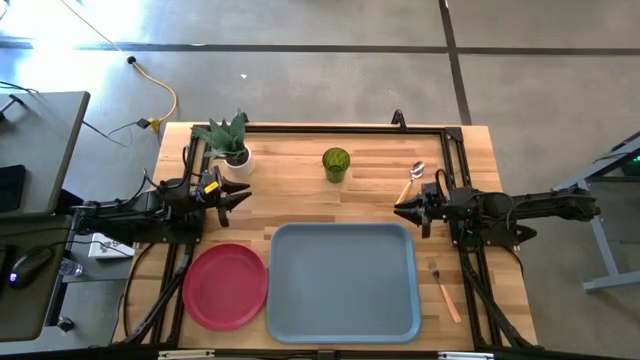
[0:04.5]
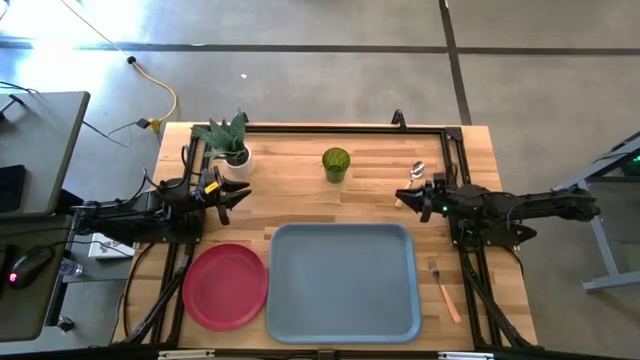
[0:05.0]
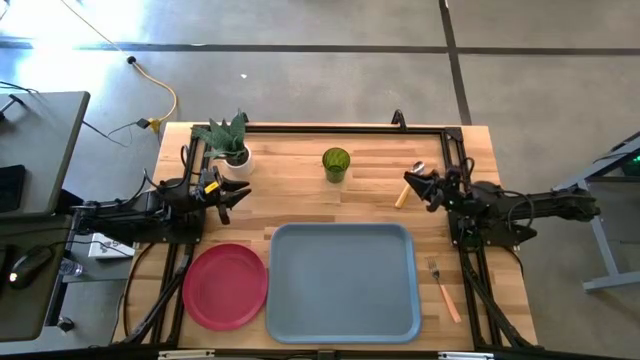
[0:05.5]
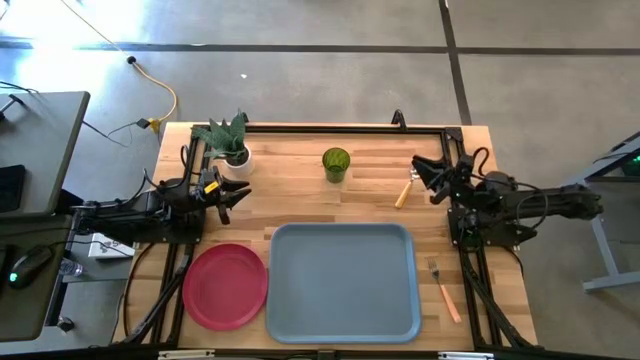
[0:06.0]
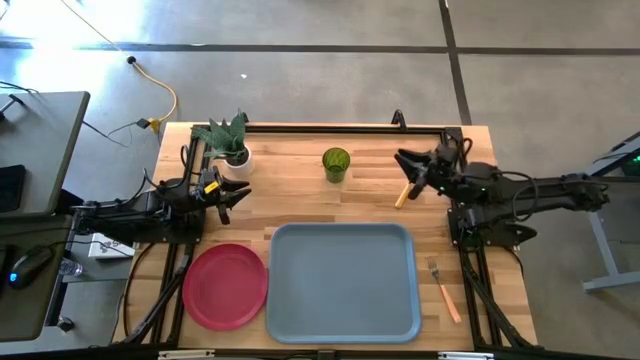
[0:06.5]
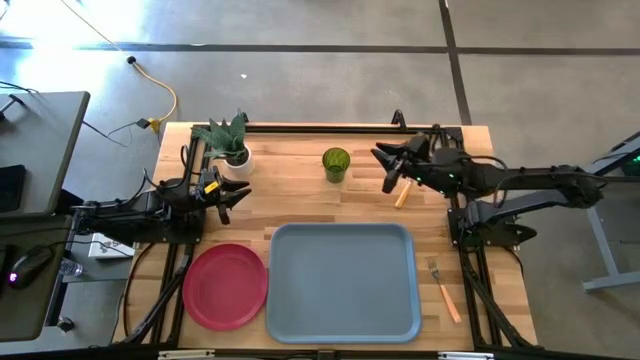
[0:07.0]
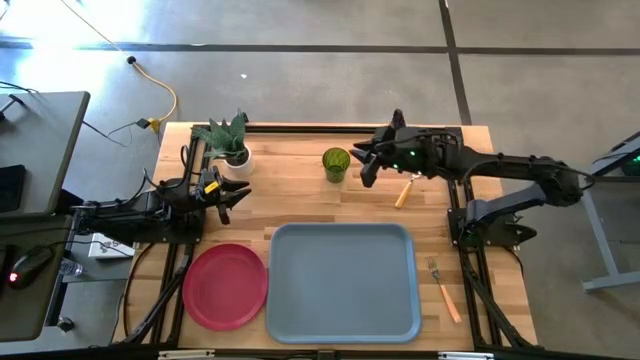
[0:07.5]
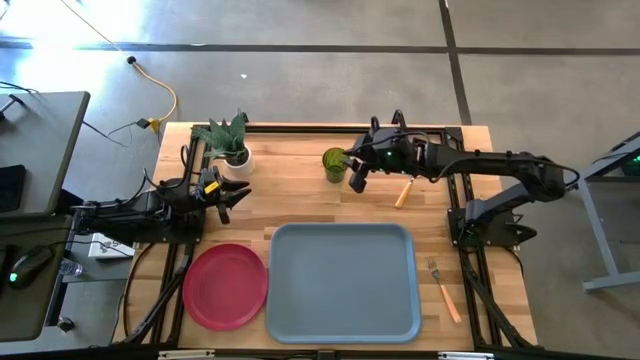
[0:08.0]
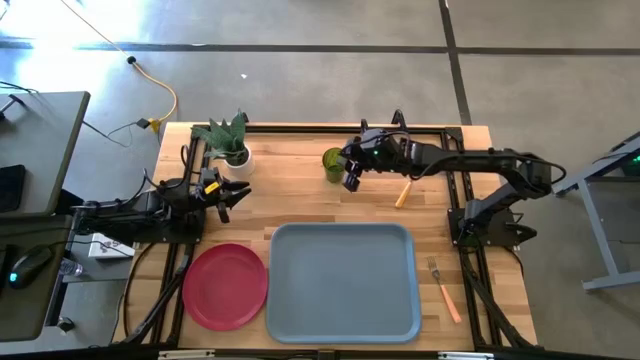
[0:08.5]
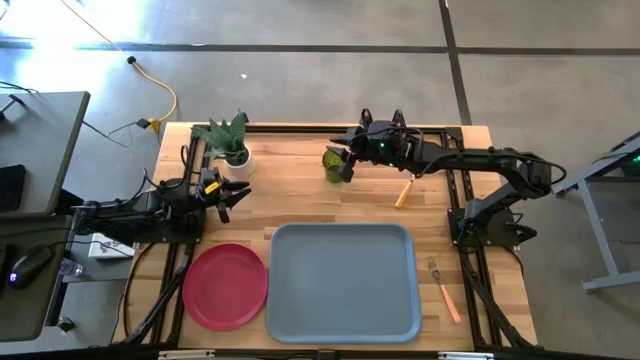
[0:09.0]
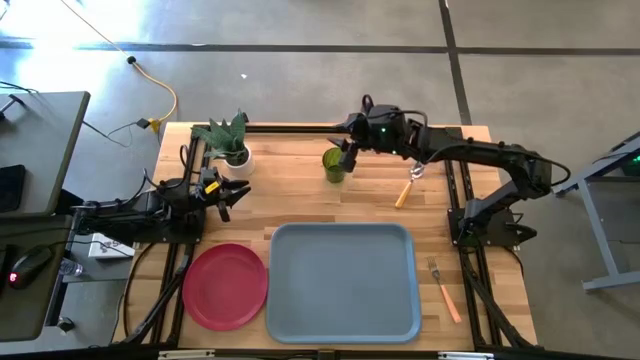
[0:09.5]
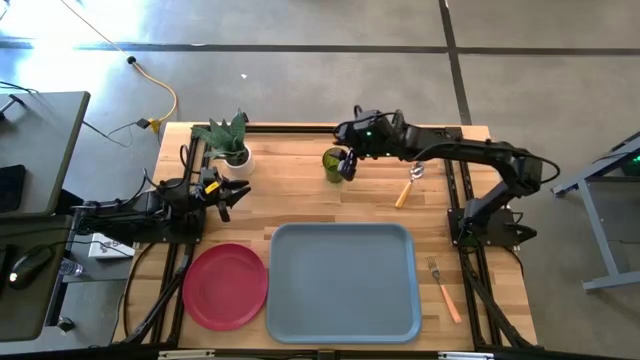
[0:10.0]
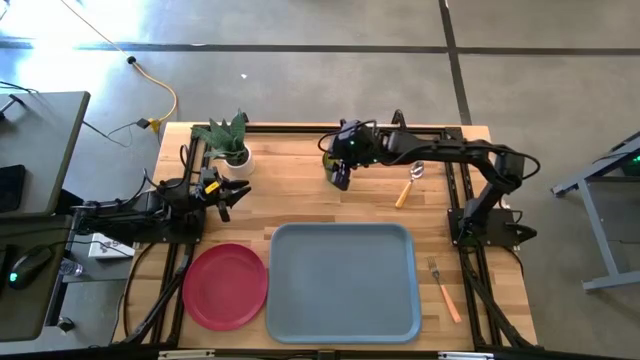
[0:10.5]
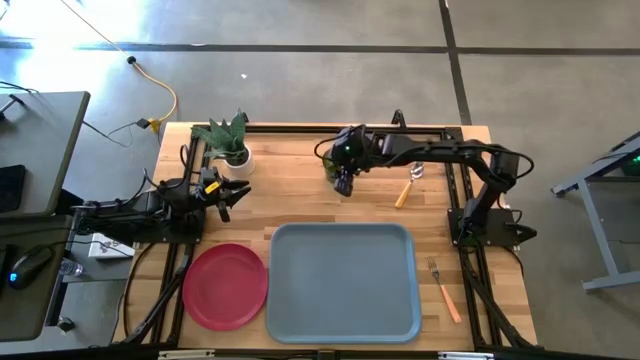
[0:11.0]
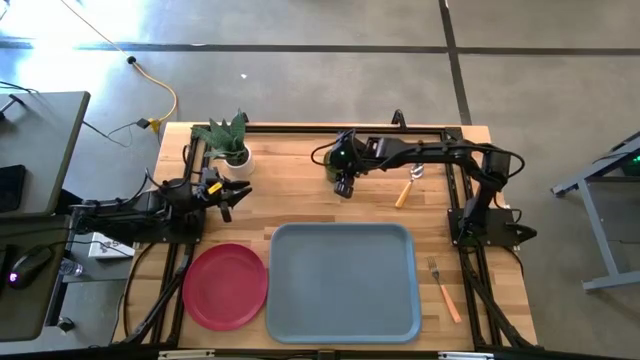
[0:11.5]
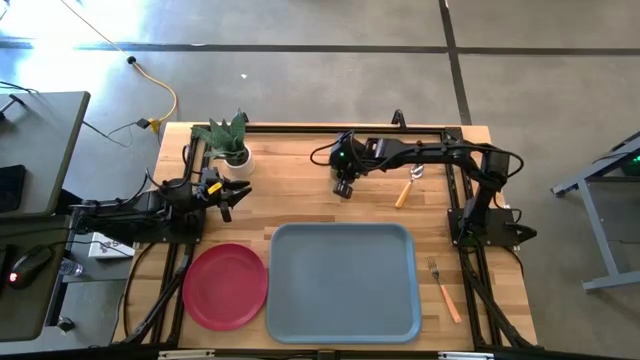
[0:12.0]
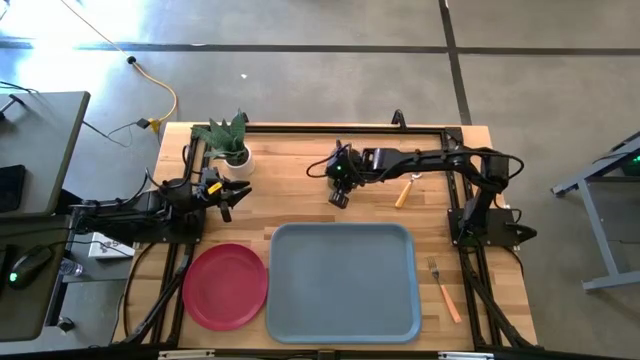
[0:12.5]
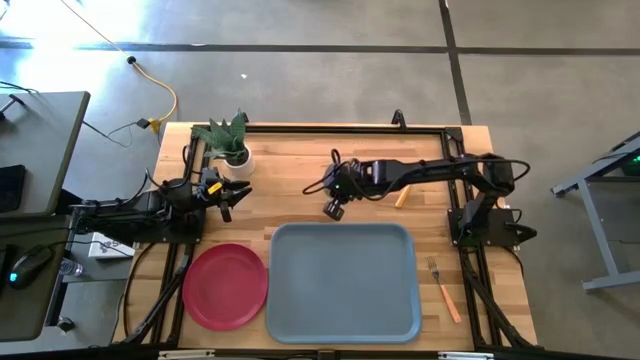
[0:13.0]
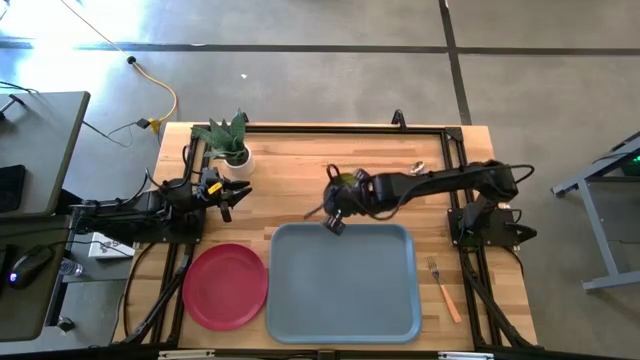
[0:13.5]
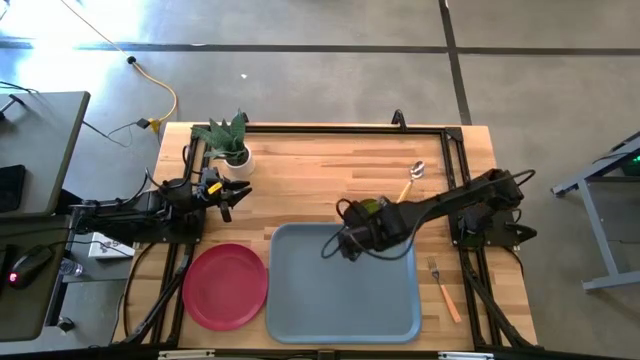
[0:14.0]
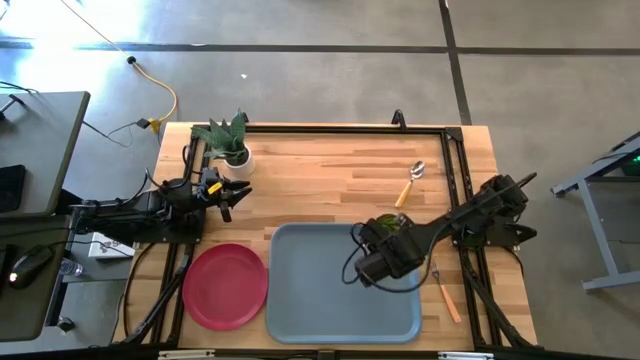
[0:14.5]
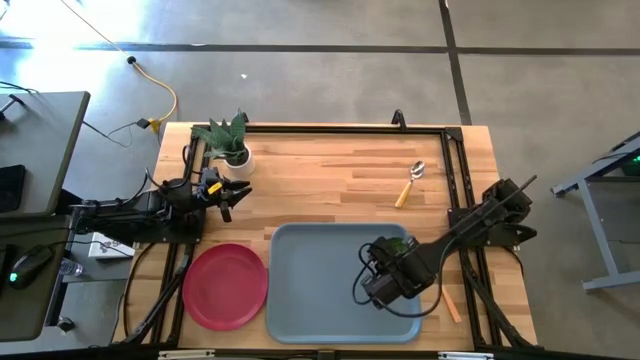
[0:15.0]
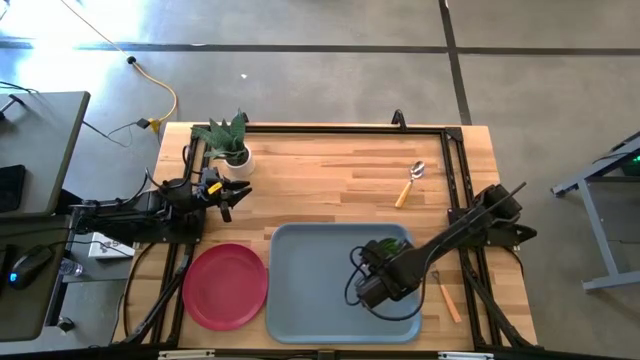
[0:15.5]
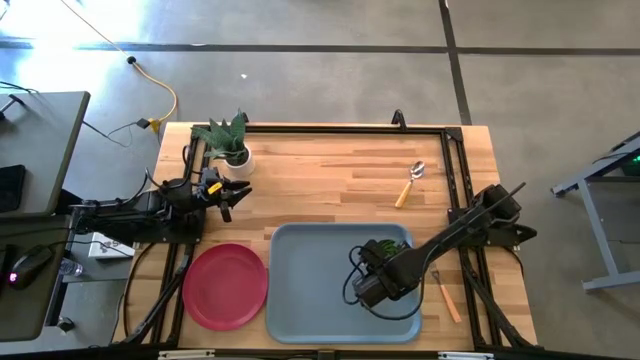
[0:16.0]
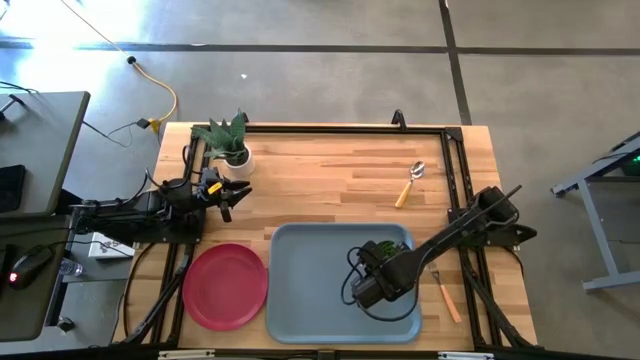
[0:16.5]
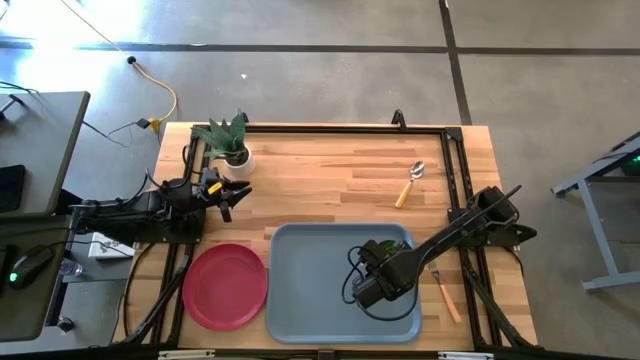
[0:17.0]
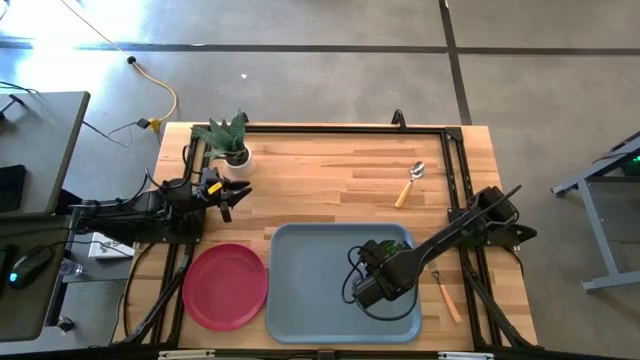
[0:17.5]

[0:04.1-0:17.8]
Task: Pick and place plate/cup/fork/spoon on tray
Put the green cup on the blue tray

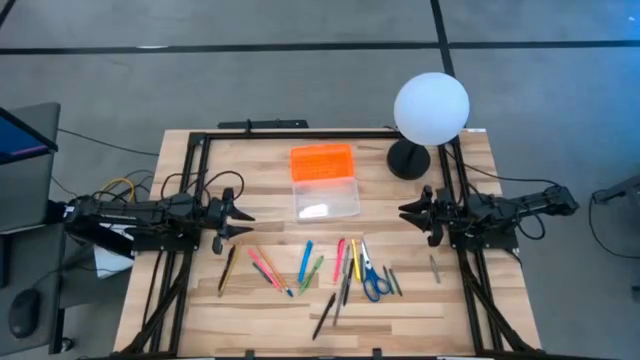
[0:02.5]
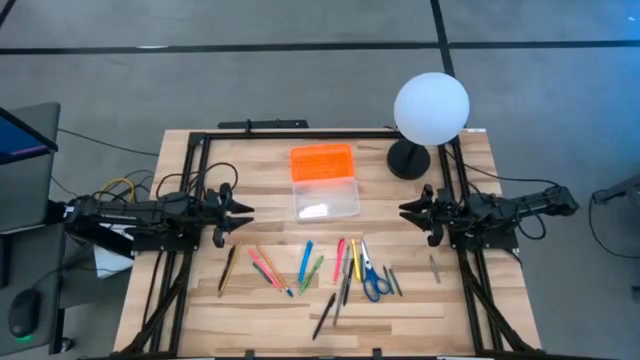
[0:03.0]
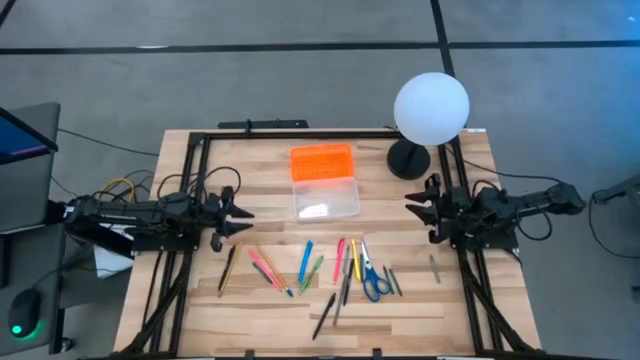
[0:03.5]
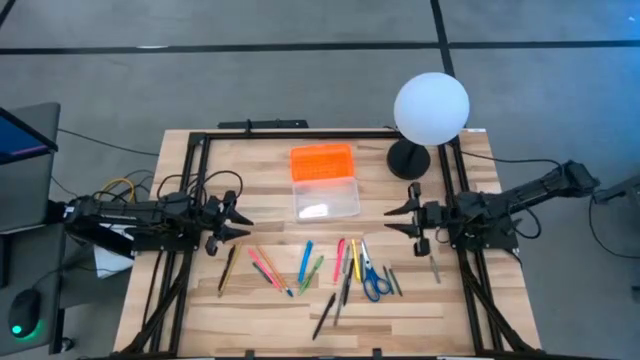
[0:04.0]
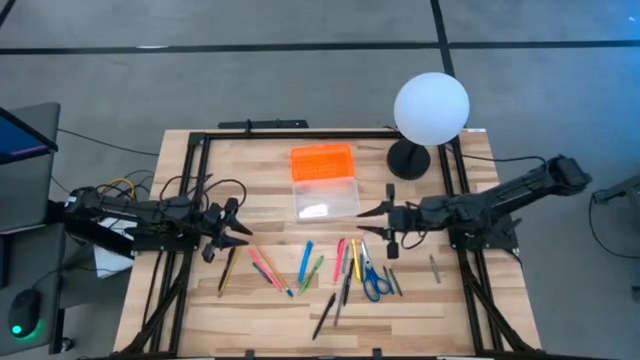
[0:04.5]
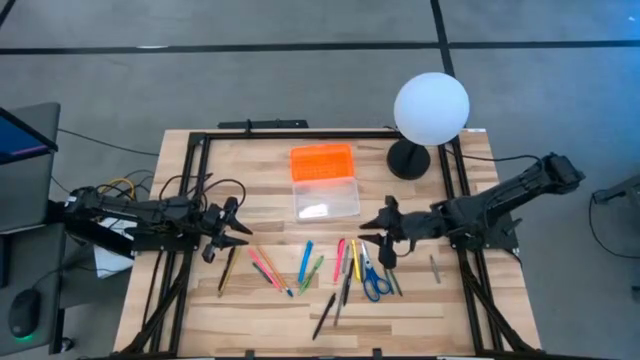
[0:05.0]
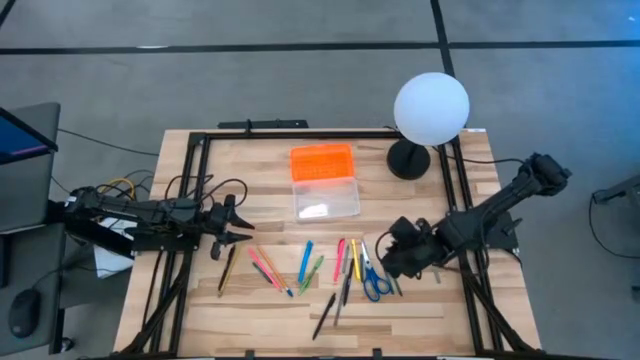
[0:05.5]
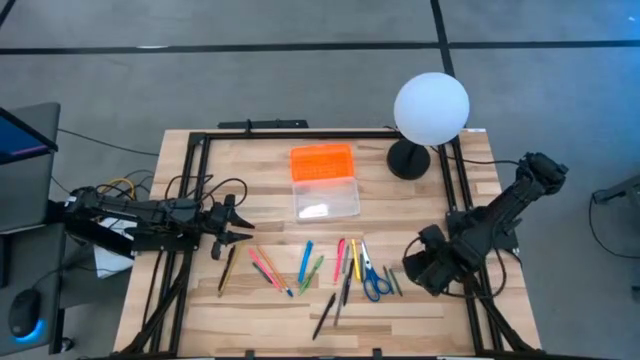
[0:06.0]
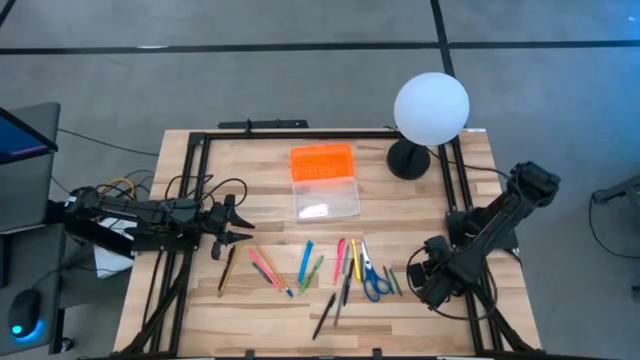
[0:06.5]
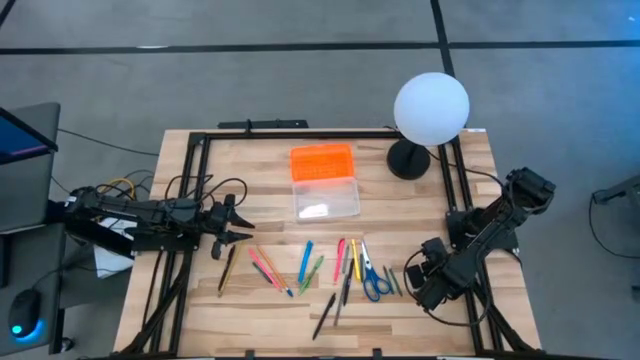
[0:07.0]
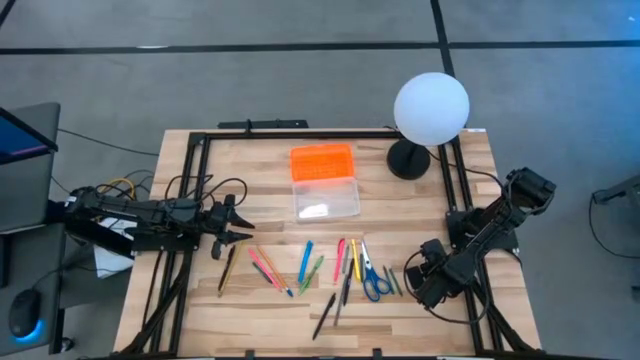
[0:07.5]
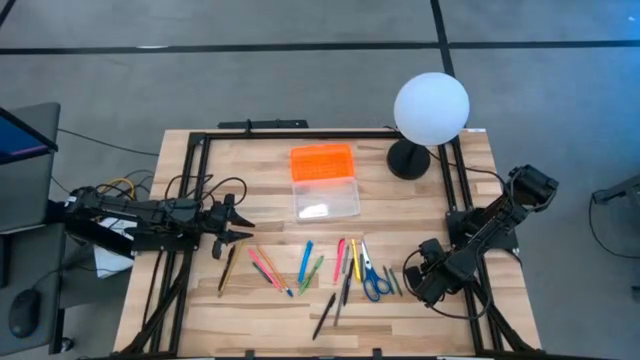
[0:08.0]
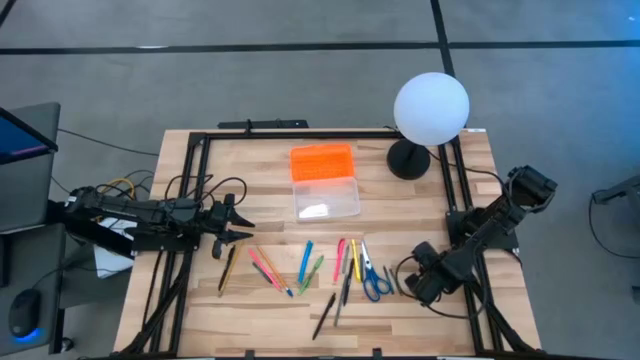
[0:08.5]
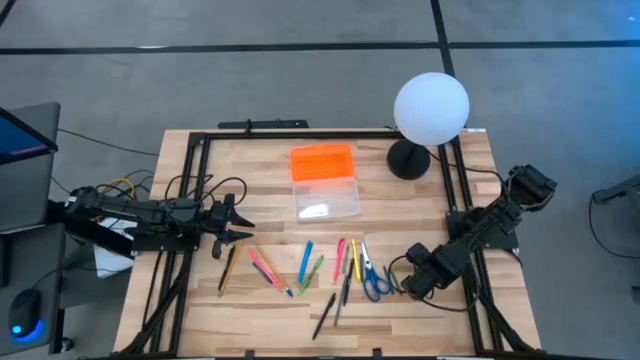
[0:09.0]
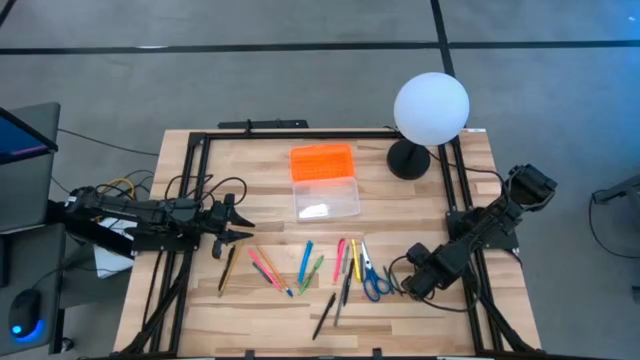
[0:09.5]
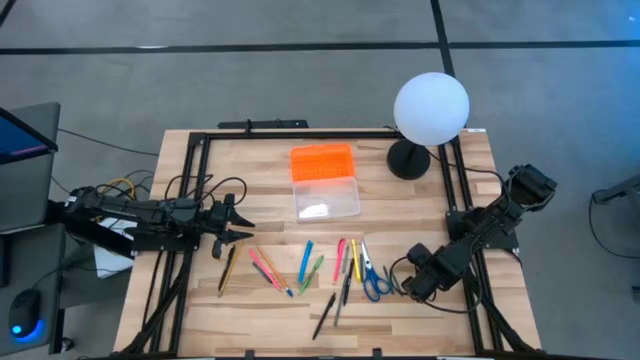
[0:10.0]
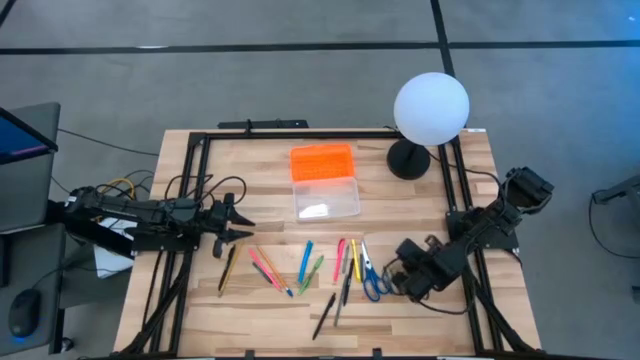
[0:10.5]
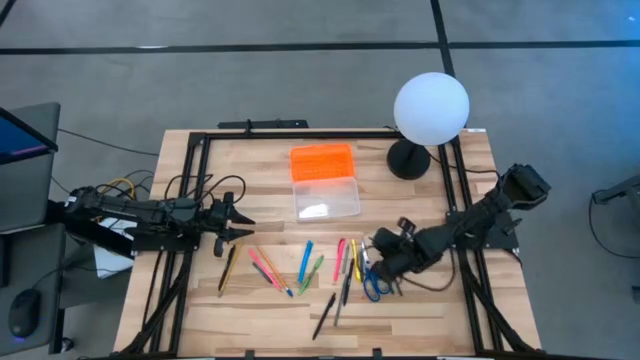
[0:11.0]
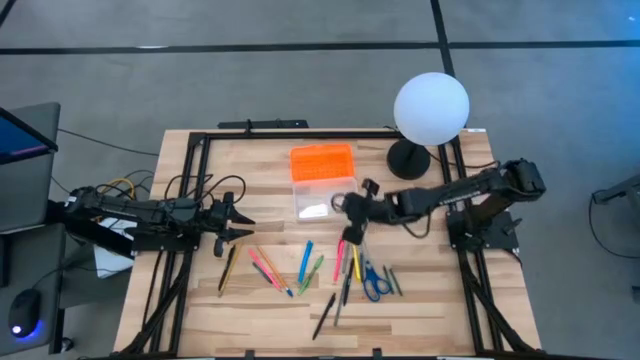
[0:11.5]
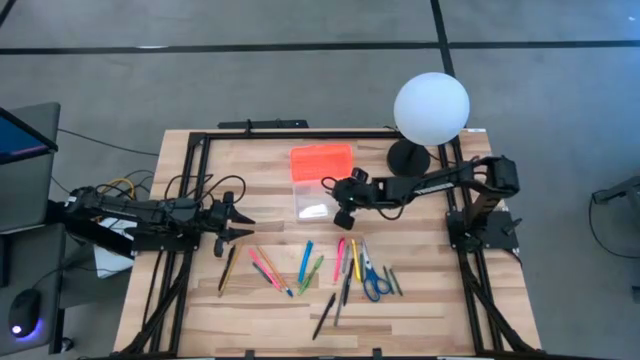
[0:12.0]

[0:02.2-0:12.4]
Task: Pick & place school supplies into a supply box
Put the gray crayon into the supply box
